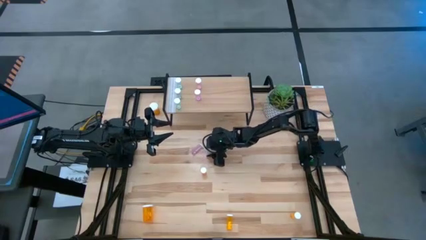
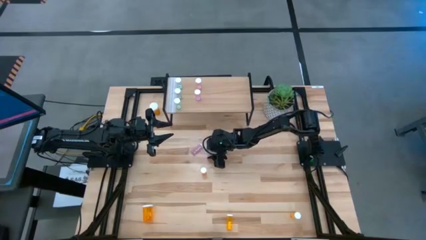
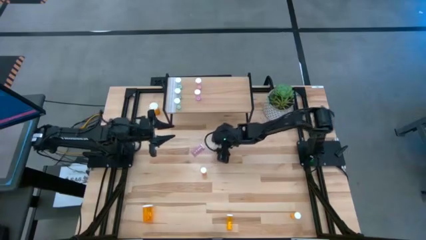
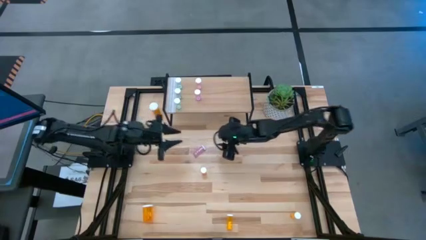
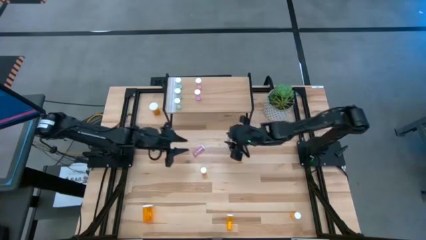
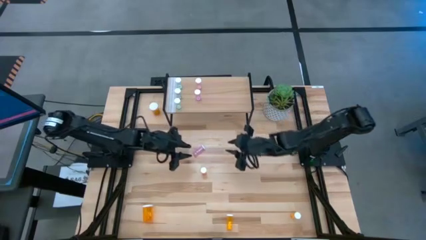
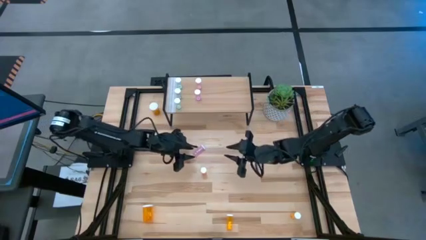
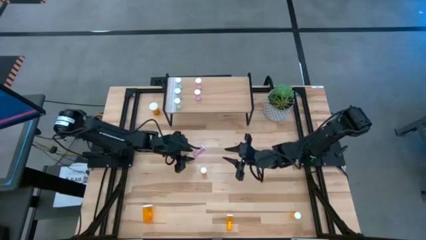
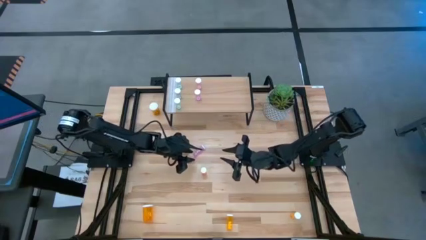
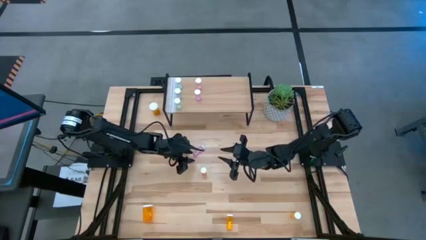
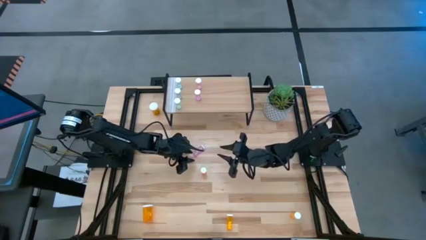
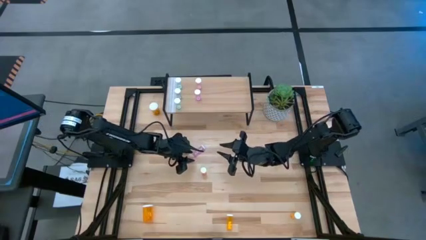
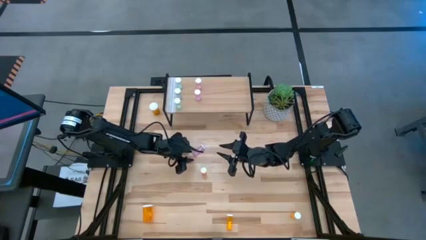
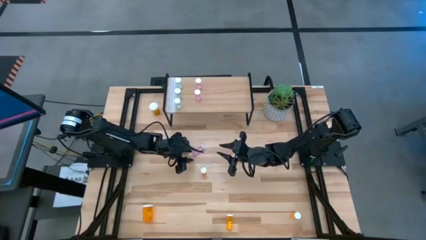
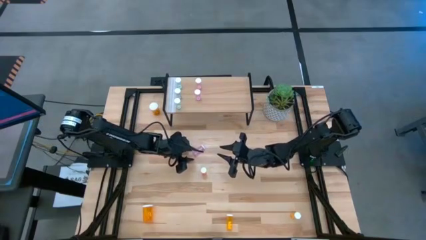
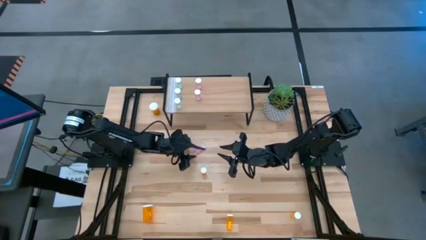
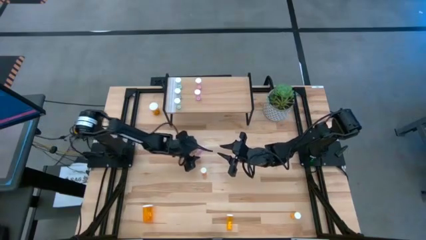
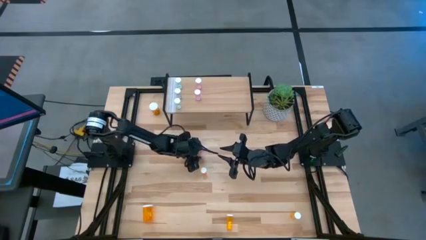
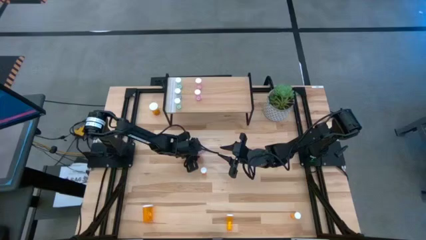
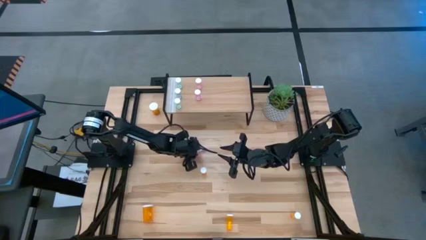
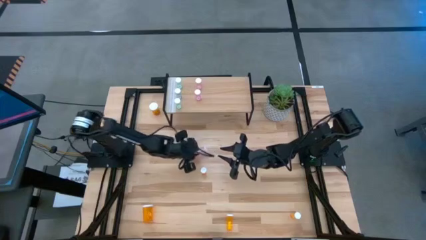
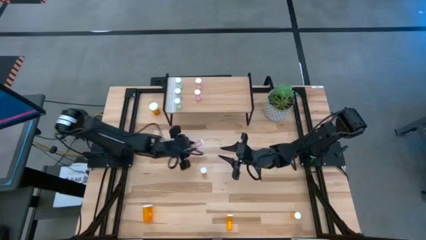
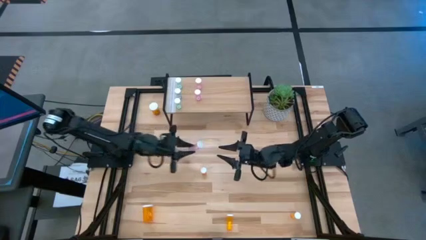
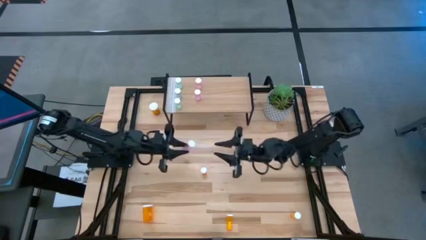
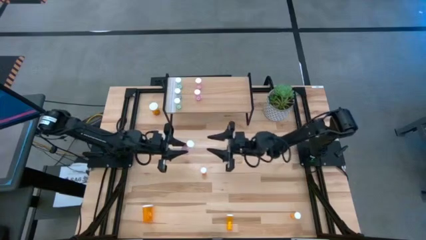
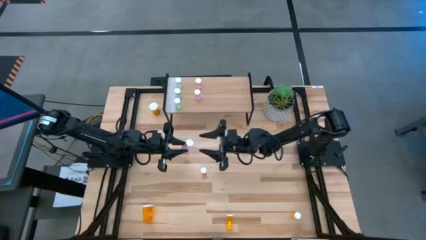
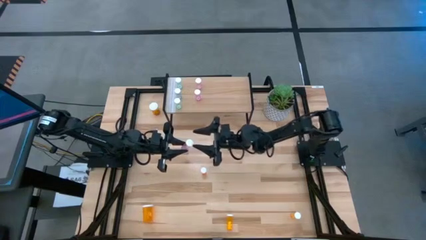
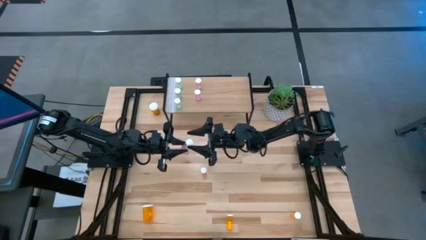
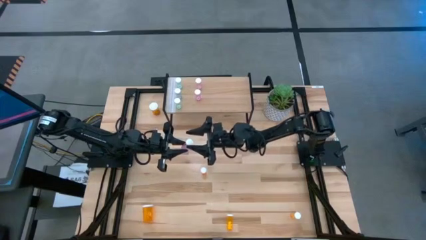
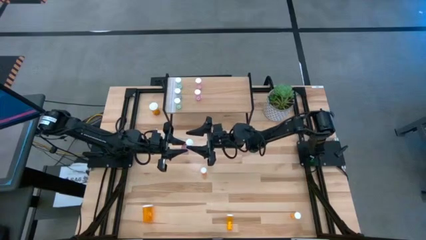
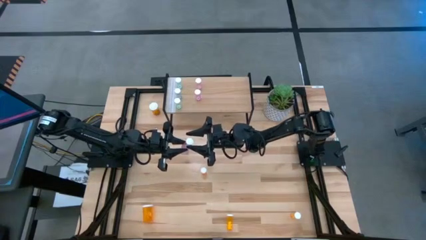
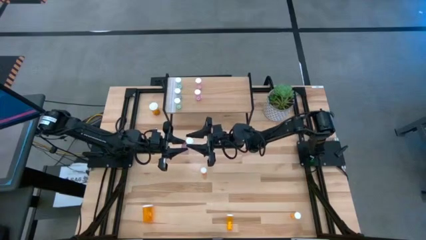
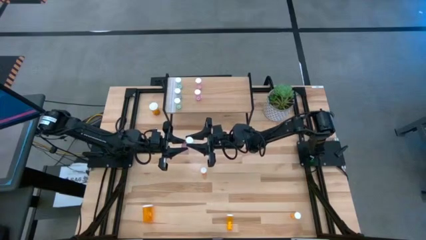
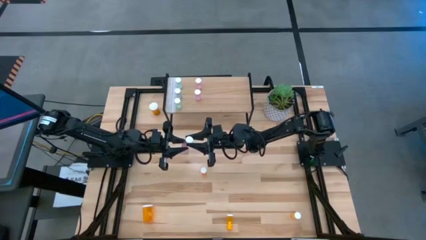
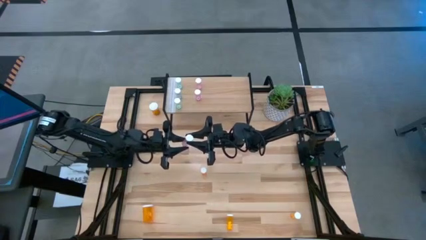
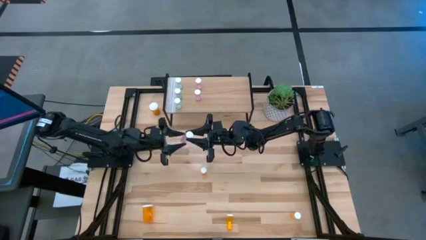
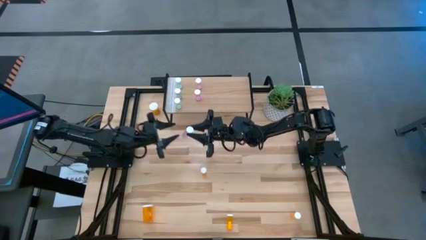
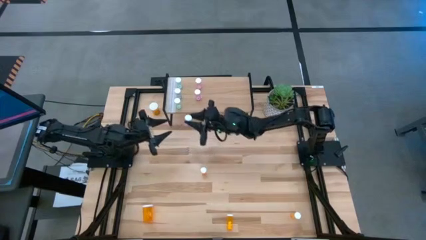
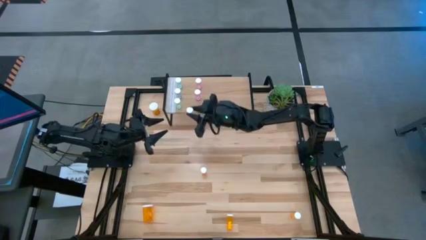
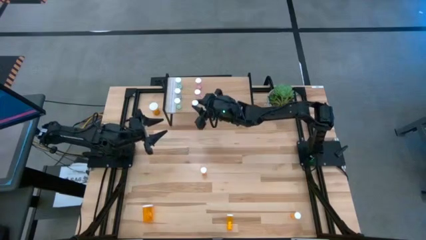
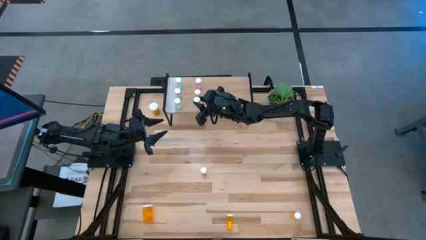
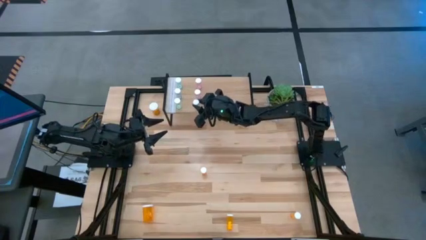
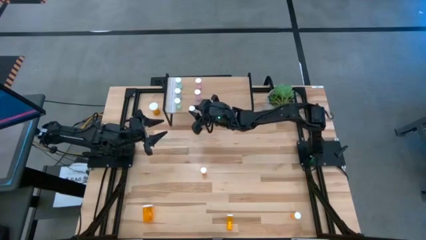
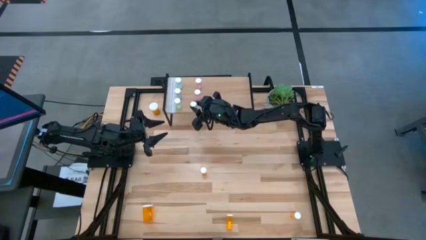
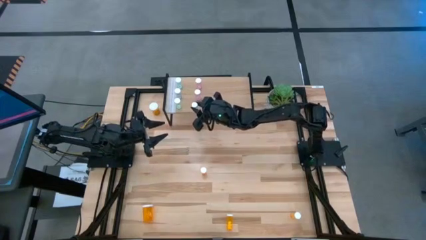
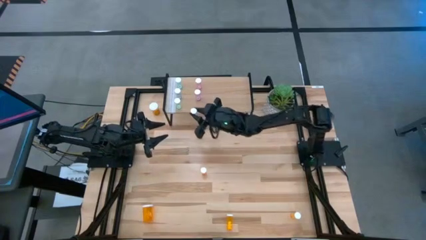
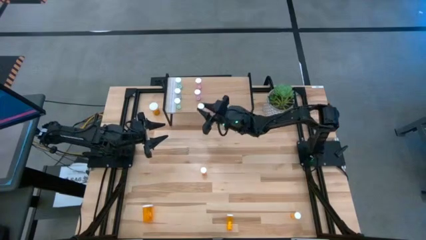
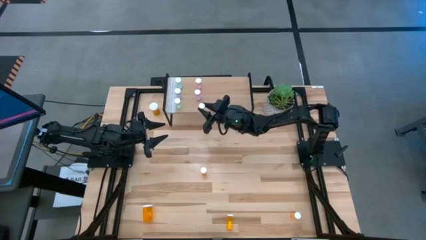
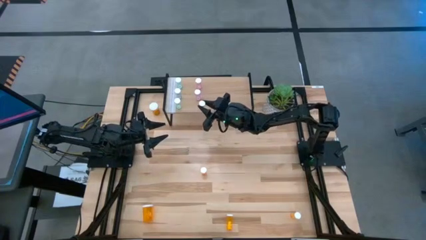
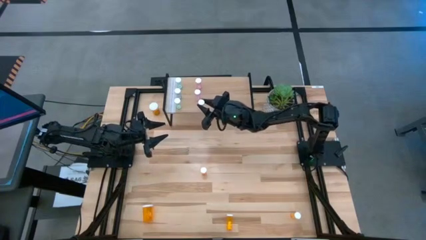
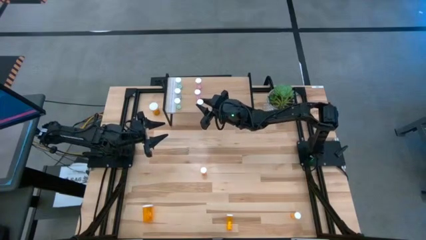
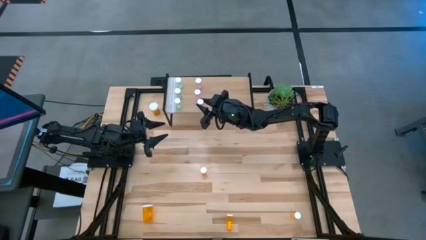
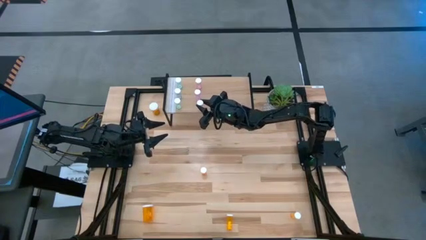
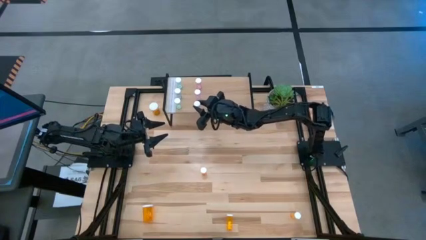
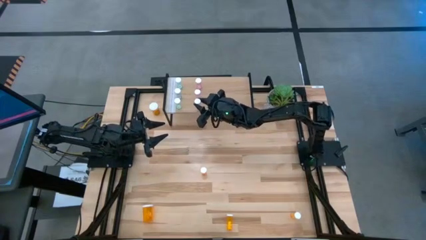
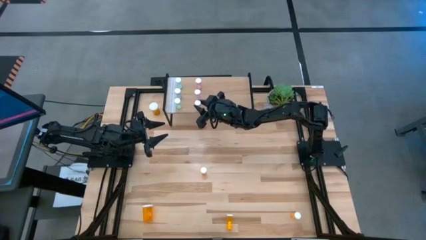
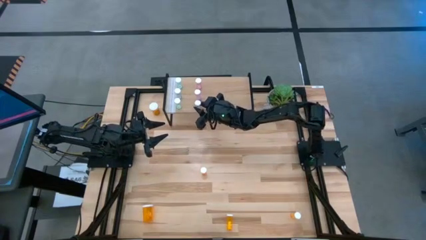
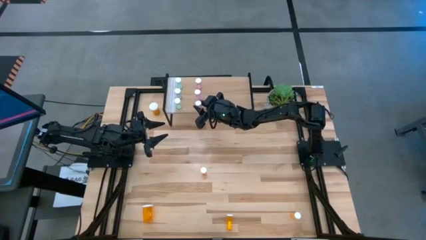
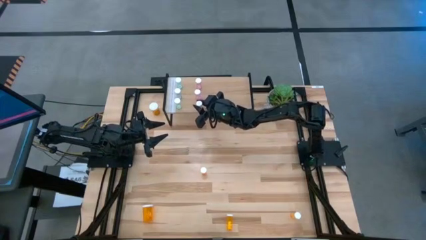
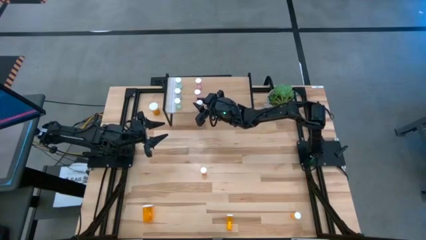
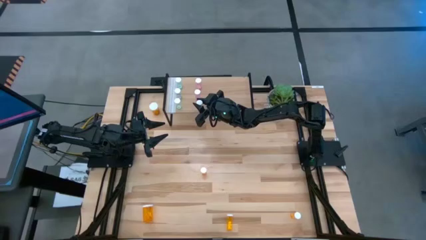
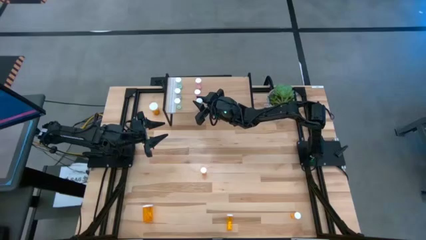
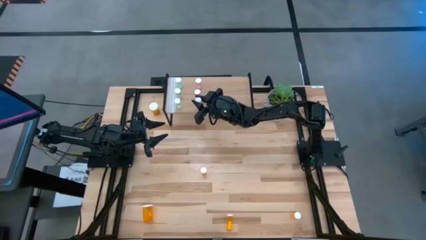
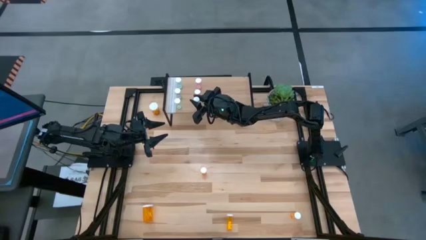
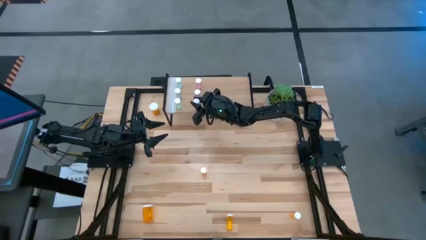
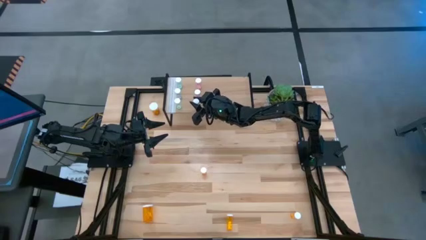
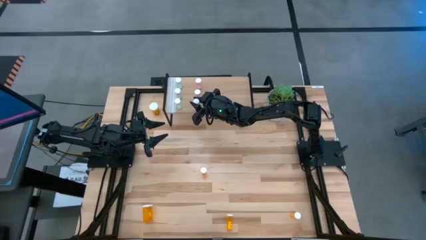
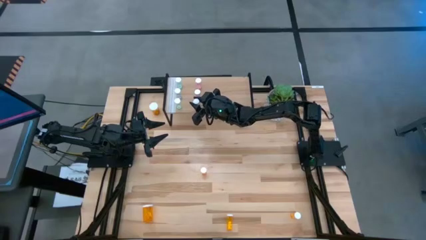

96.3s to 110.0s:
Task: Pick and place medicine bottles onto shelf by color
Put the pink pill bottle on the shelf aligned with the other pink pill bottles
